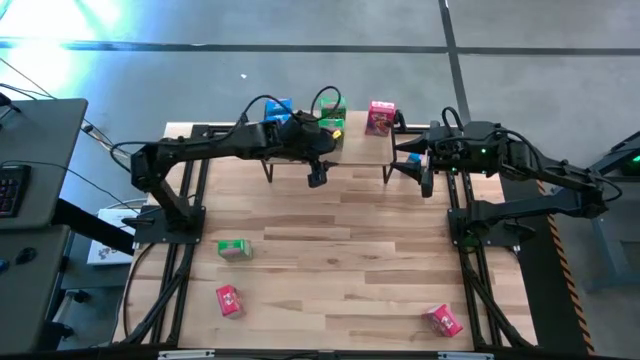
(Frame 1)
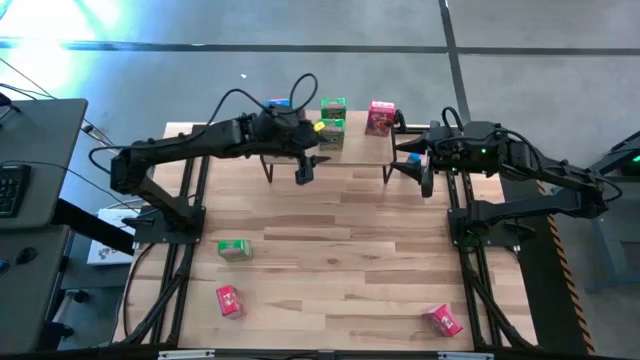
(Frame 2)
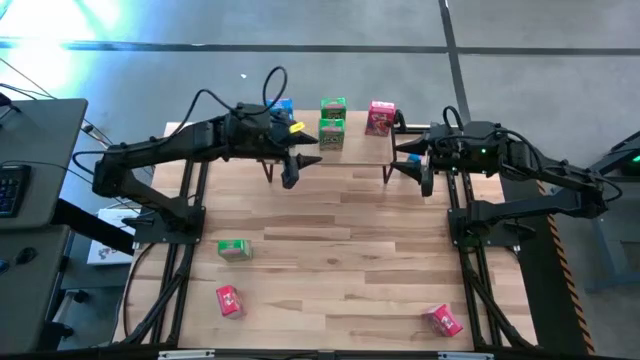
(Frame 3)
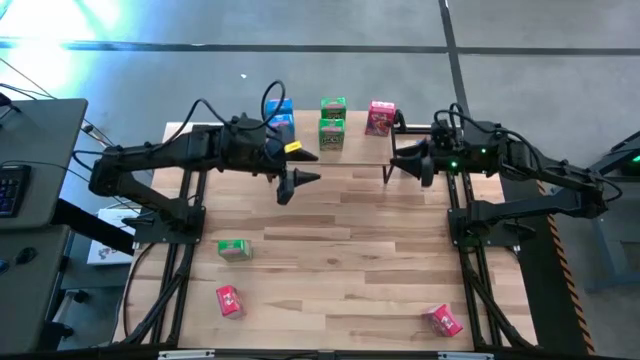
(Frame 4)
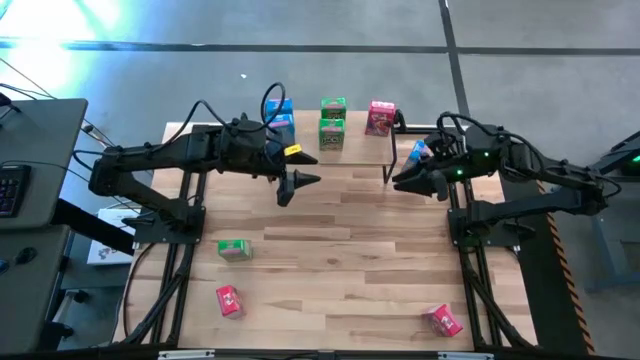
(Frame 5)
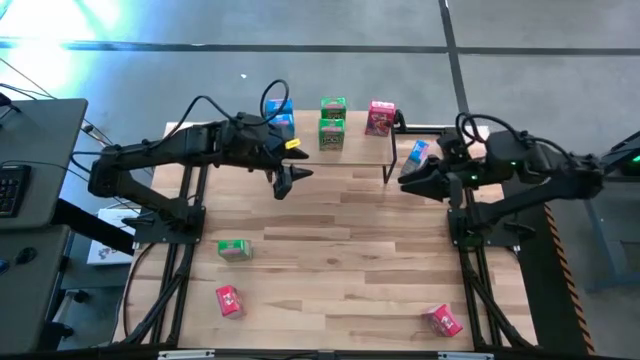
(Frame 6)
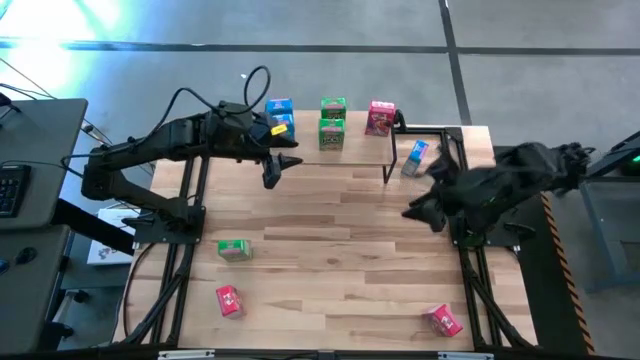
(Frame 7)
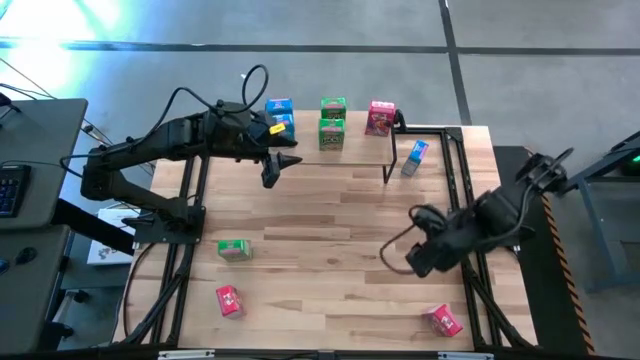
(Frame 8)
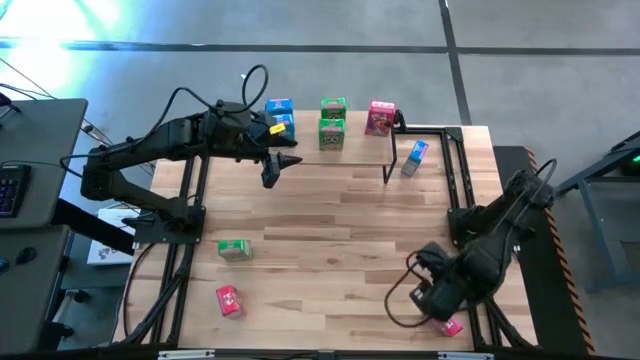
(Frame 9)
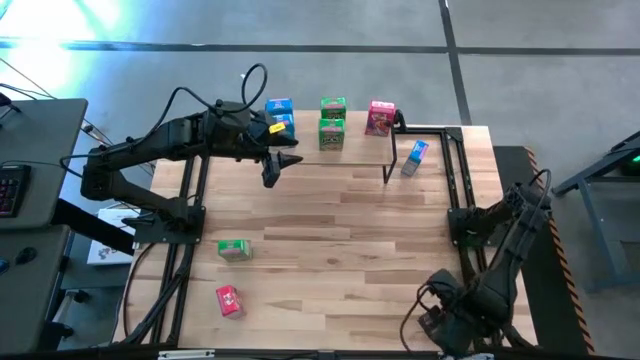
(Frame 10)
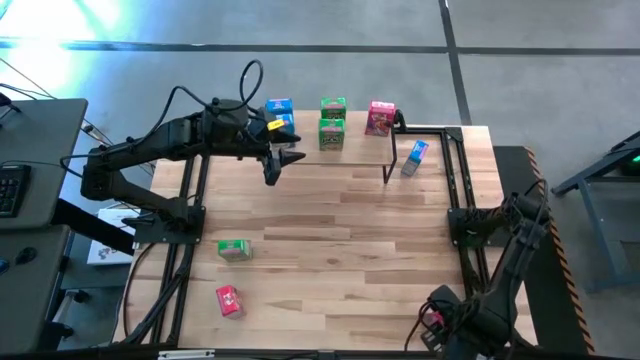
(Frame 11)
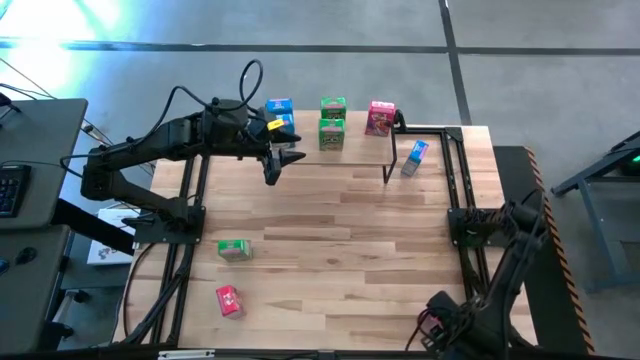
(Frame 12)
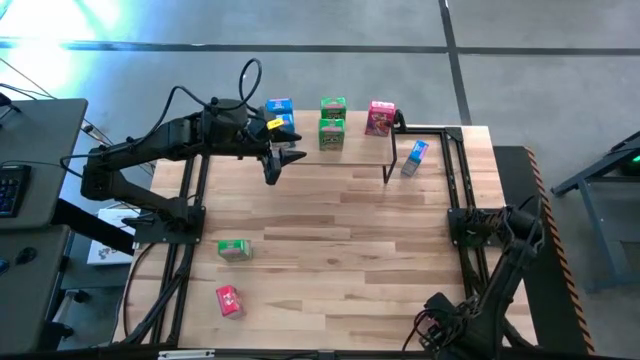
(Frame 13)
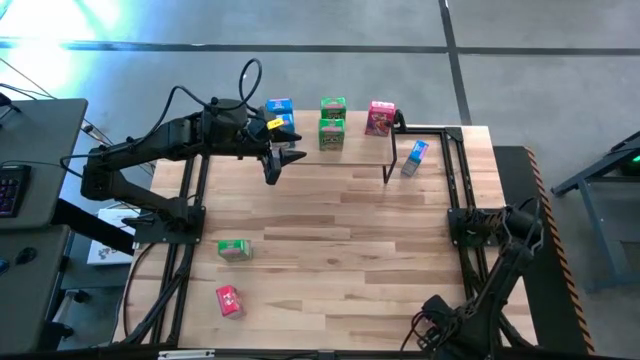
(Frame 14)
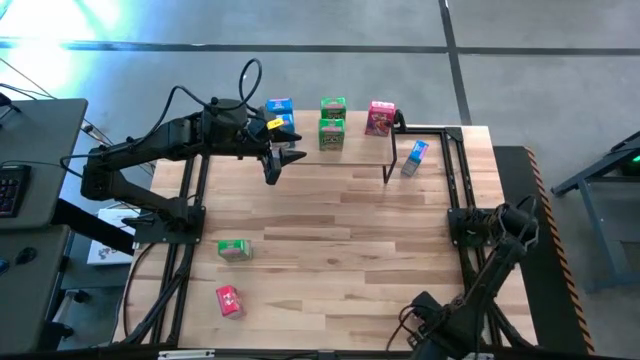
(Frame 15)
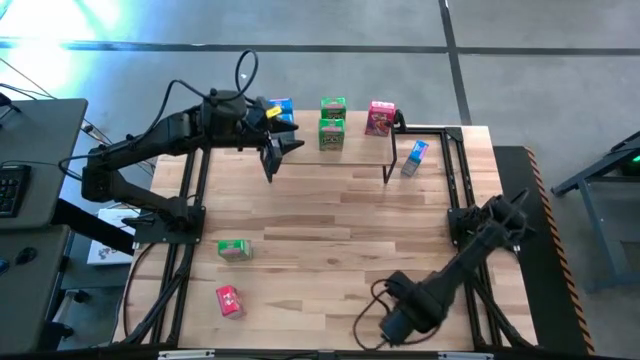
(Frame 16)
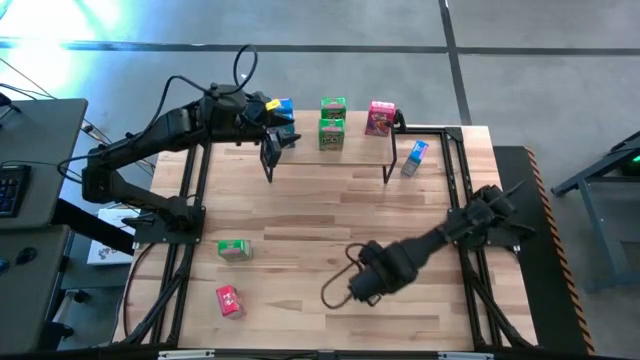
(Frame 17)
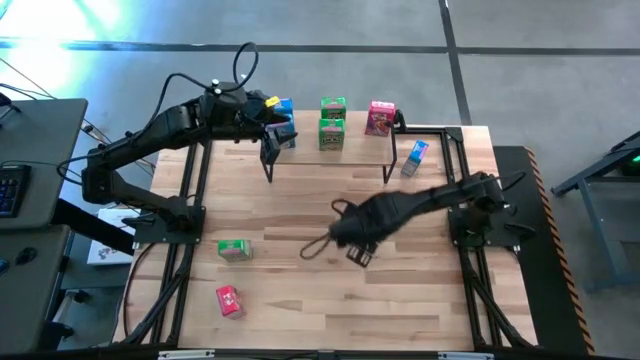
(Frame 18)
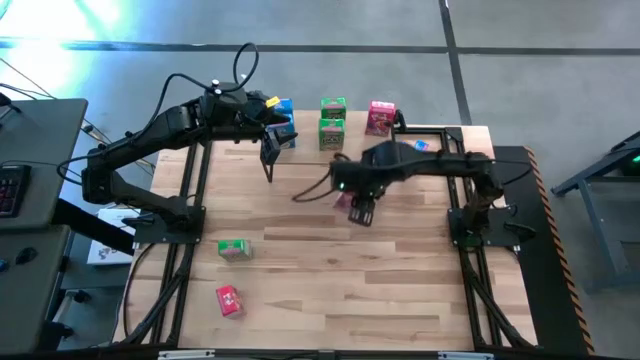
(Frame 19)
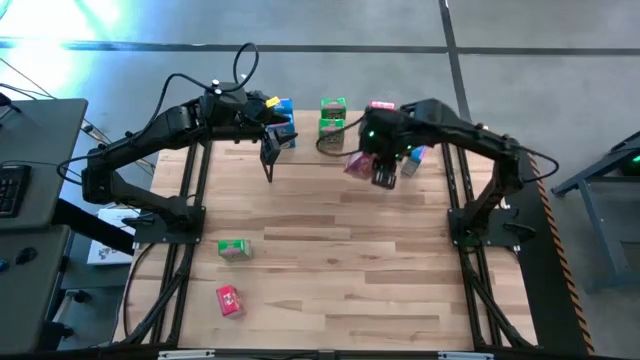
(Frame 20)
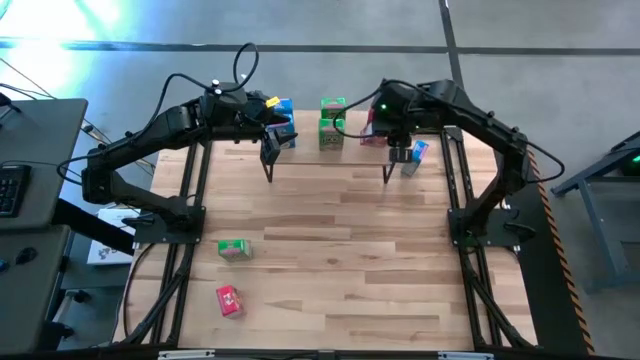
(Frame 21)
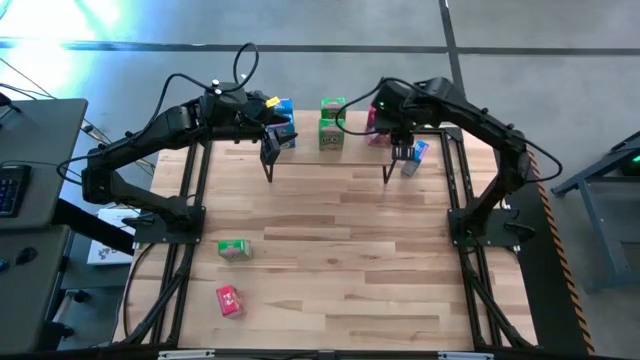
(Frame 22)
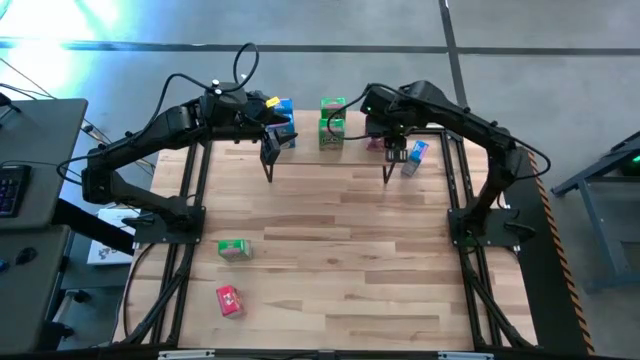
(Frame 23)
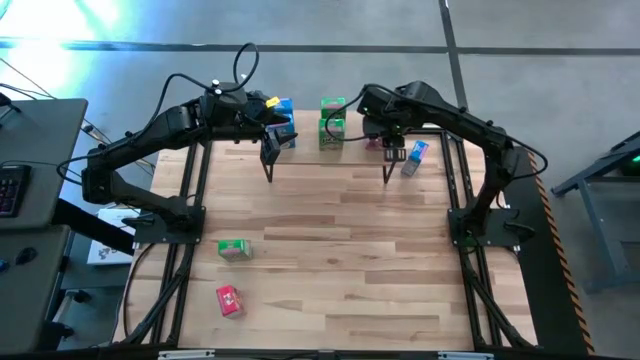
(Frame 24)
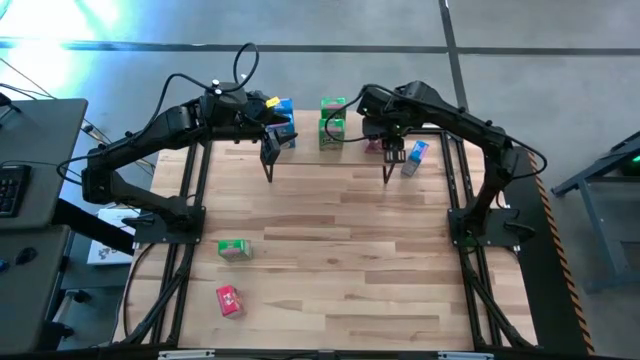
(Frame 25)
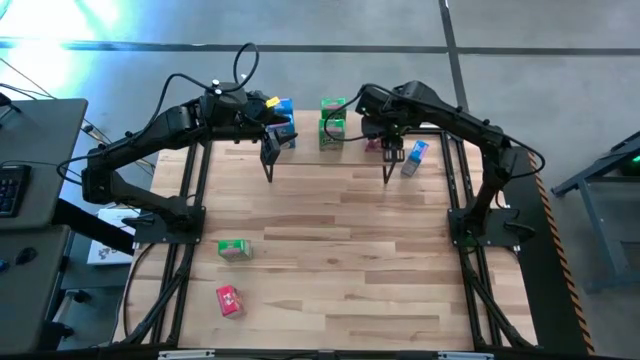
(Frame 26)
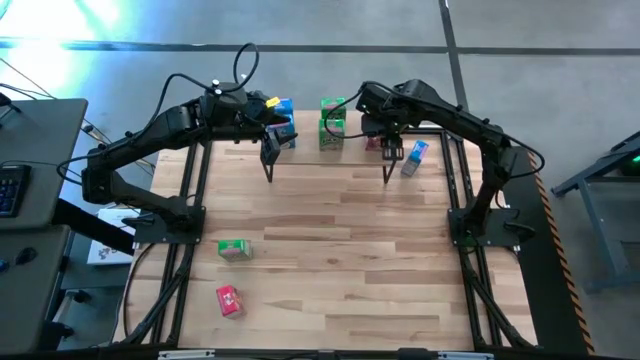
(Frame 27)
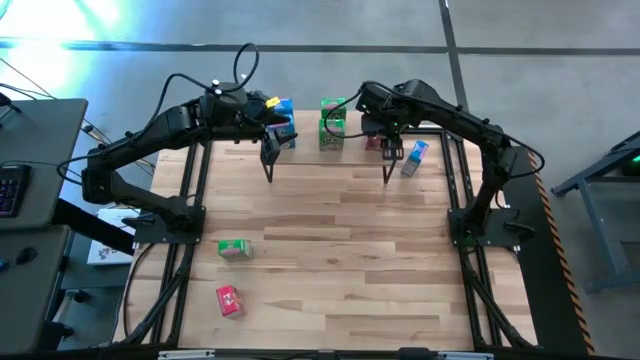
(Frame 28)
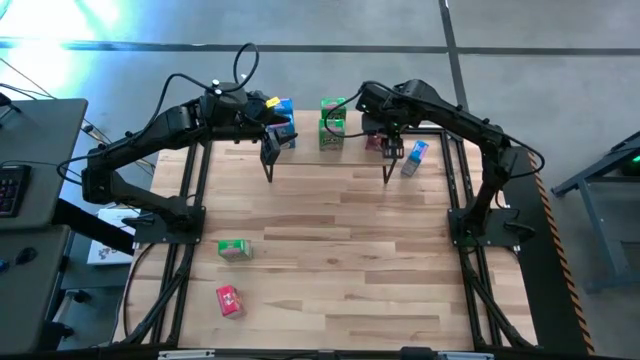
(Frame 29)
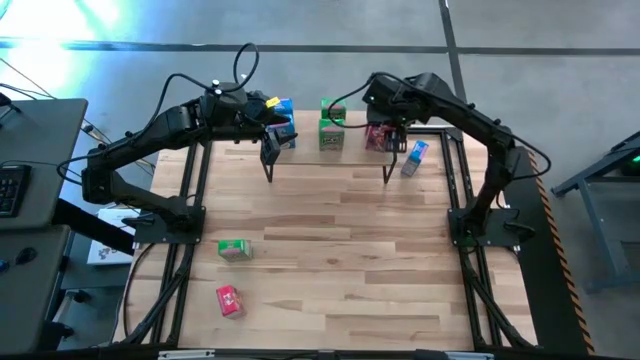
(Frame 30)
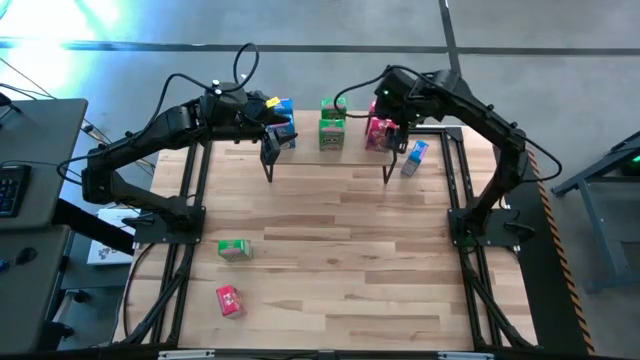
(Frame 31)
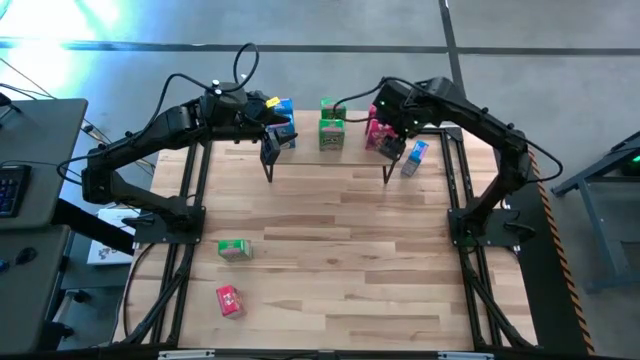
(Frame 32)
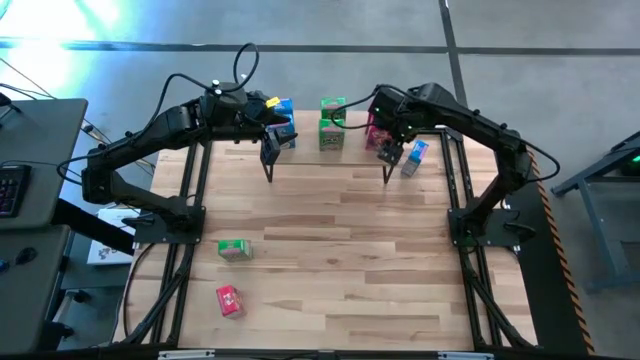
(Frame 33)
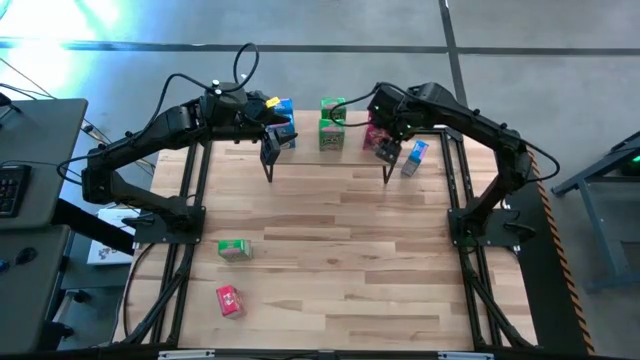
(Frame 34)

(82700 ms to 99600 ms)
Task: Stack cereal on shelf
Put the right red cereal box on the shelf aligned with the other red cereal box

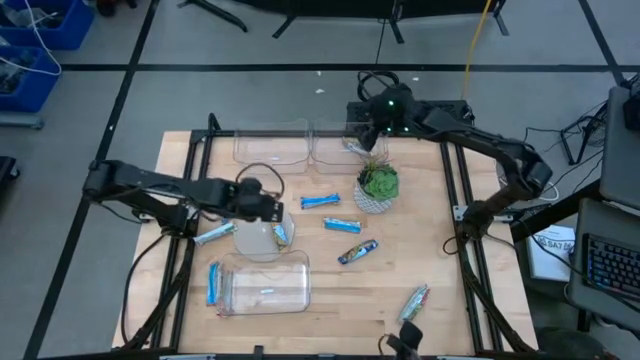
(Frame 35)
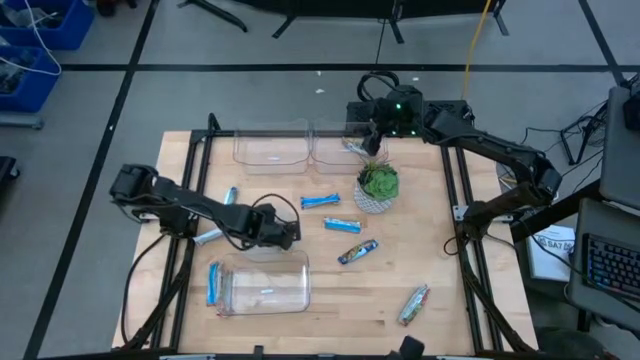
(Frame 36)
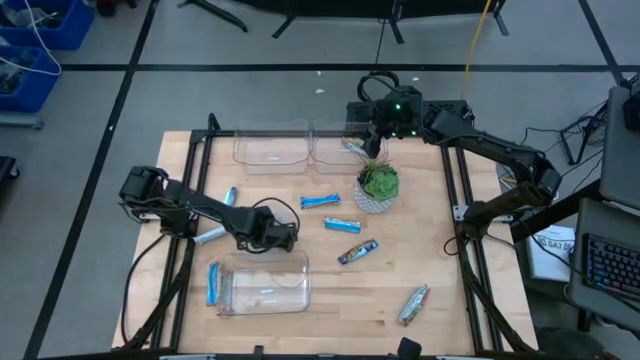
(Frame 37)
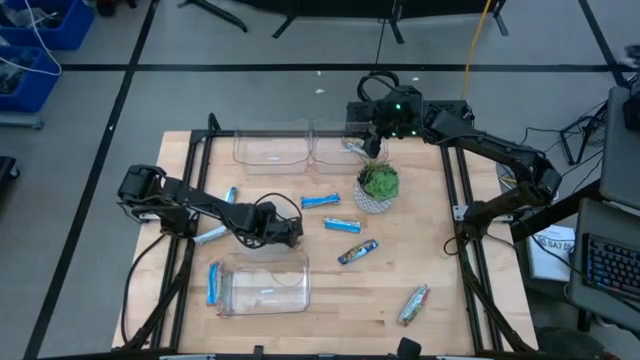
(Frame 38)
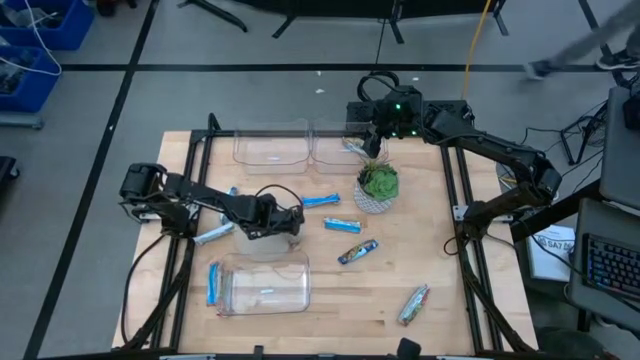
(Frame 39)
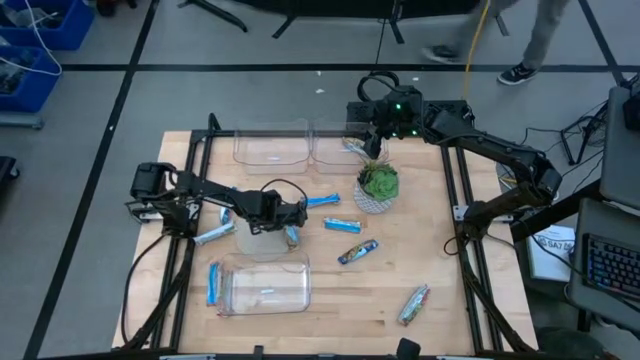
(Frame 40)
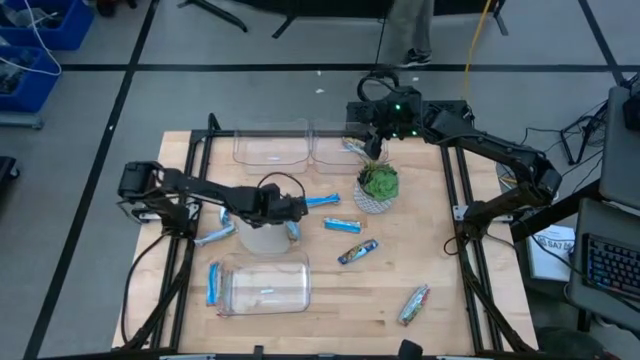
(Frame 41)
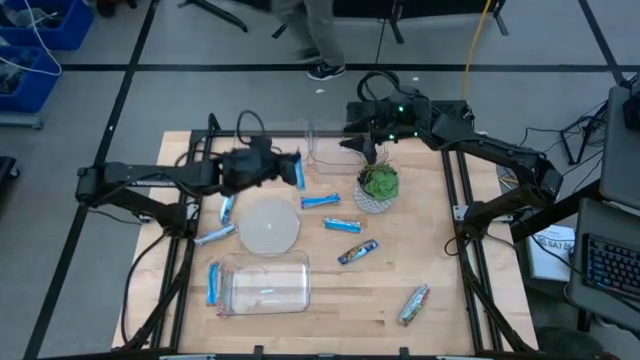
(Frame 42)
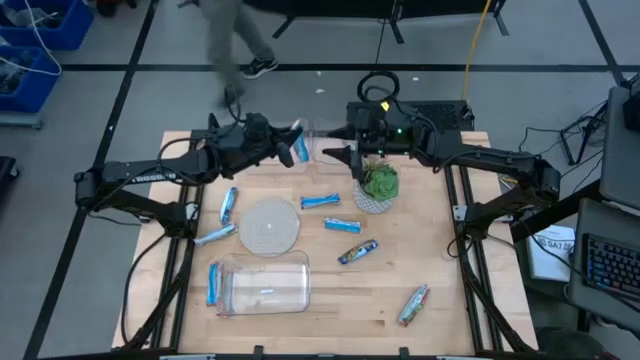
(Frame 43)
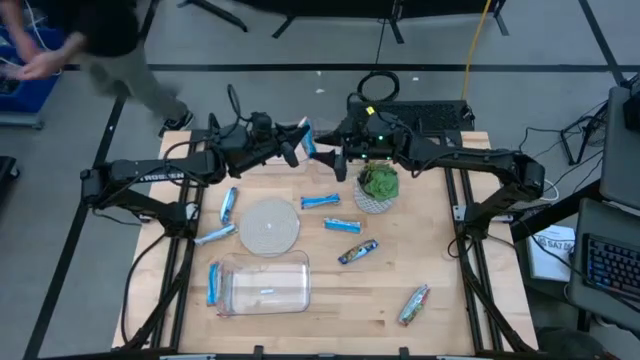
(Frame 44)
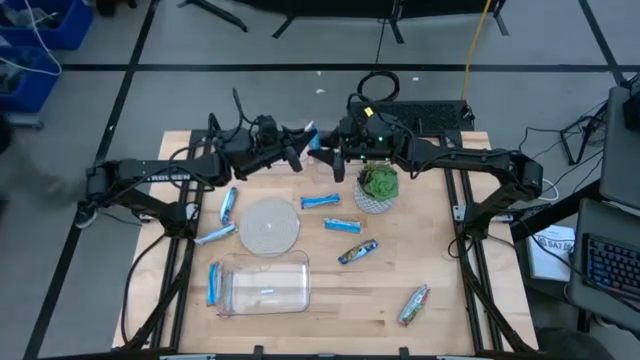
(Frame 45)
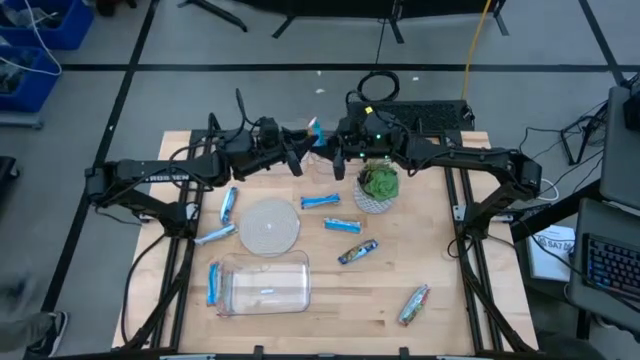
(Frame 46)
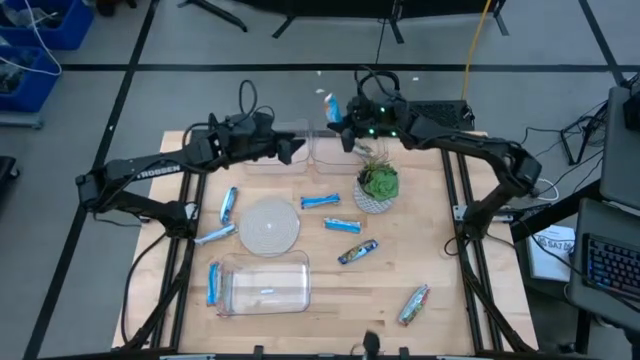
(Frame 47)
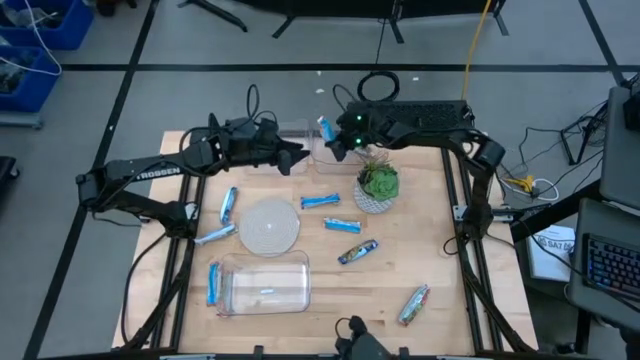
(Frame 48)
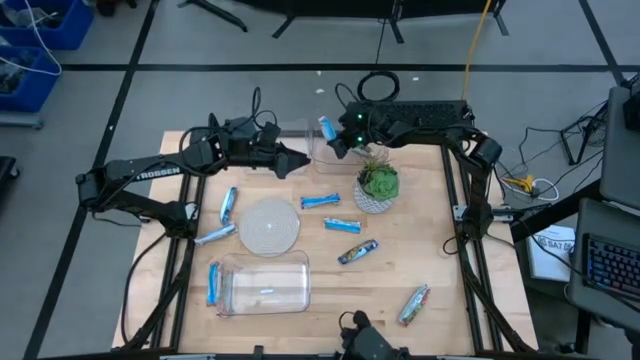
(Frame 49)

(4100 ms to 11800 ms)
Task: Pick and place Granola Bars by type
Put the yellow granola bar into the top right transparent bin
